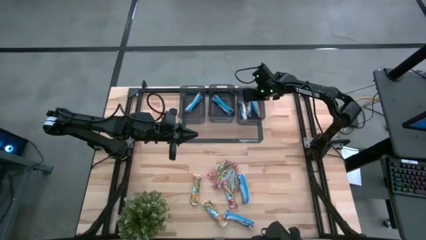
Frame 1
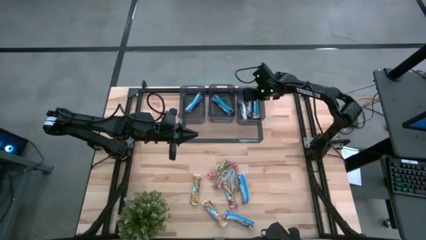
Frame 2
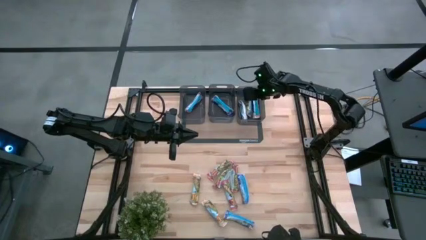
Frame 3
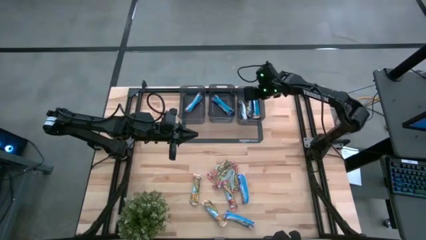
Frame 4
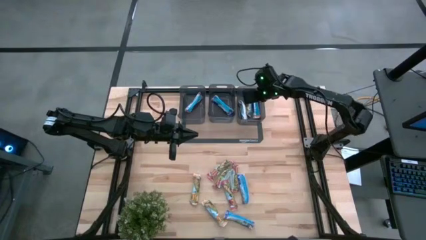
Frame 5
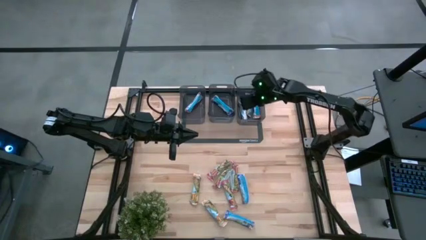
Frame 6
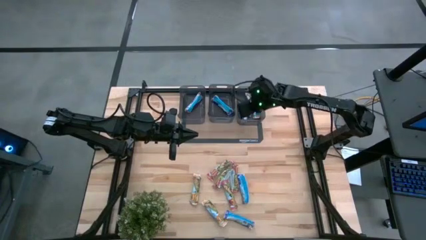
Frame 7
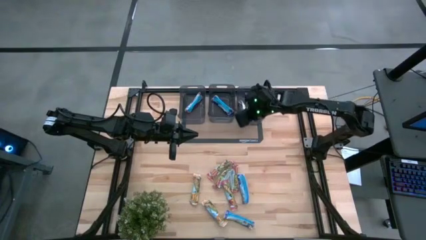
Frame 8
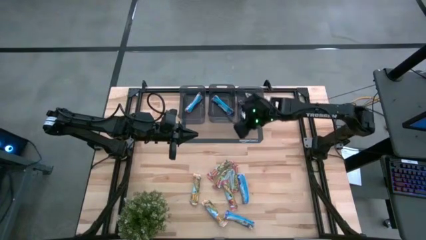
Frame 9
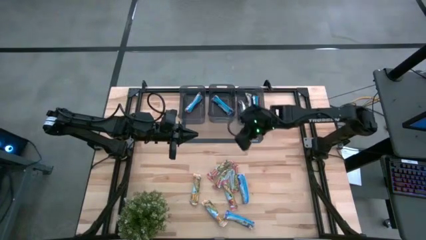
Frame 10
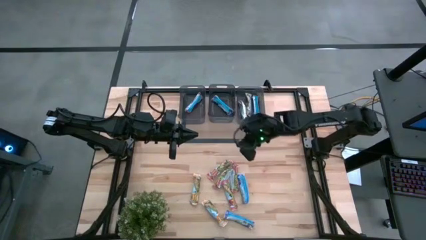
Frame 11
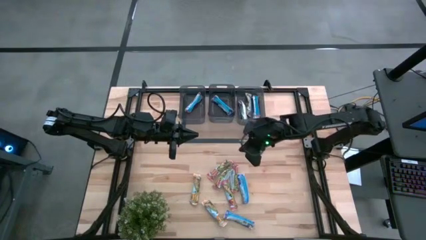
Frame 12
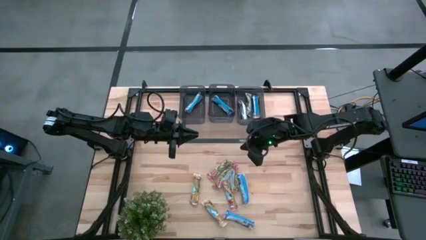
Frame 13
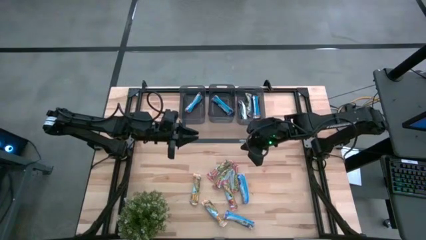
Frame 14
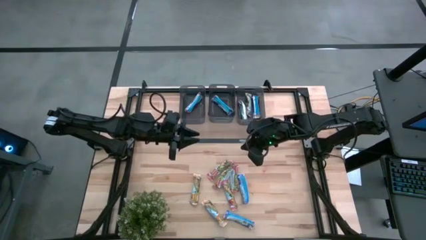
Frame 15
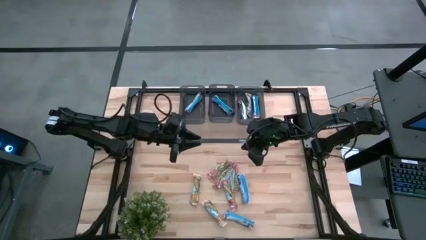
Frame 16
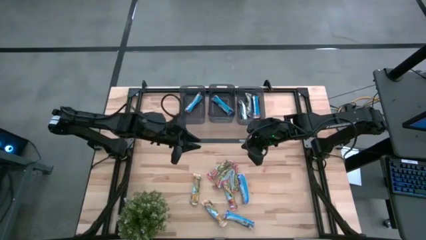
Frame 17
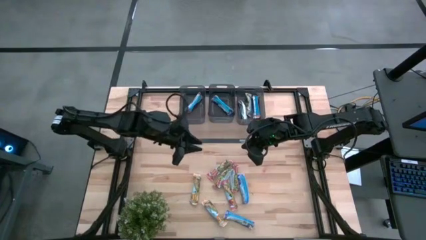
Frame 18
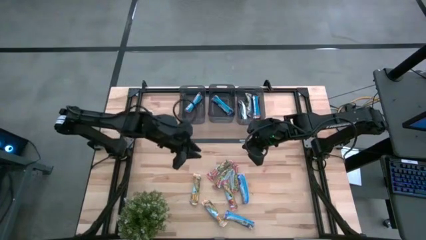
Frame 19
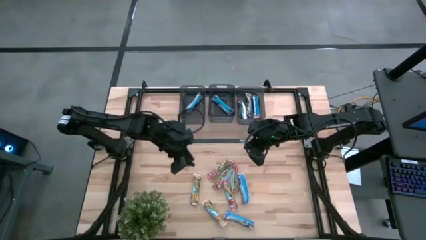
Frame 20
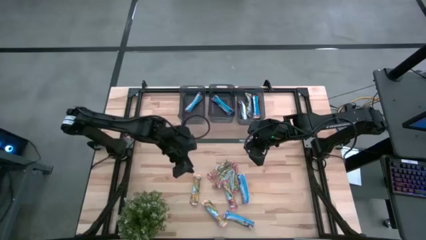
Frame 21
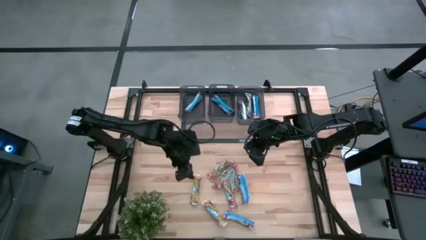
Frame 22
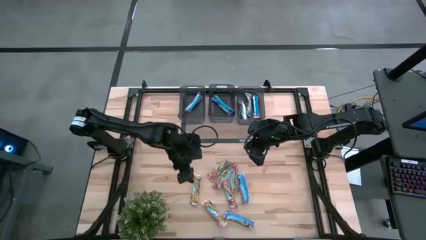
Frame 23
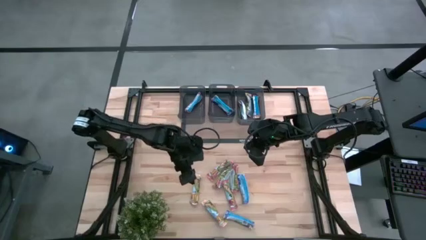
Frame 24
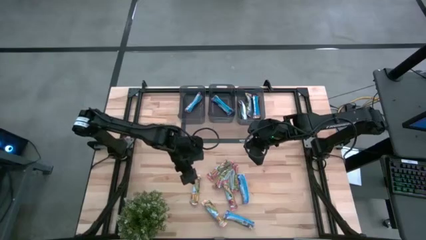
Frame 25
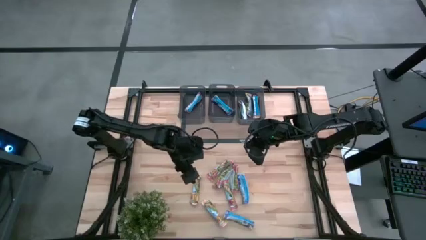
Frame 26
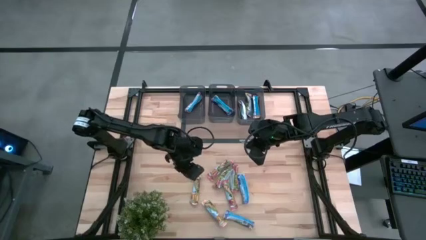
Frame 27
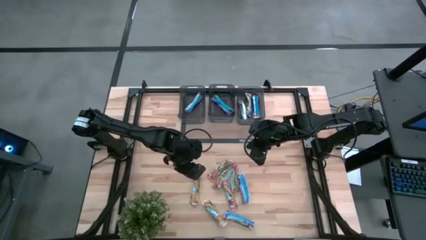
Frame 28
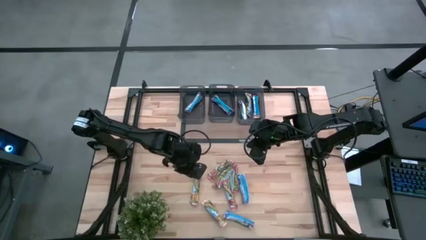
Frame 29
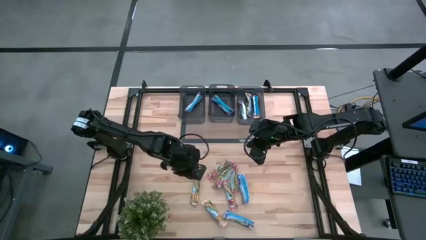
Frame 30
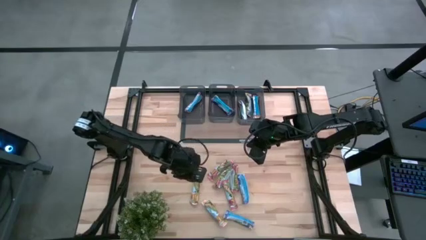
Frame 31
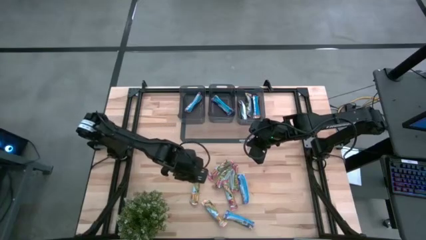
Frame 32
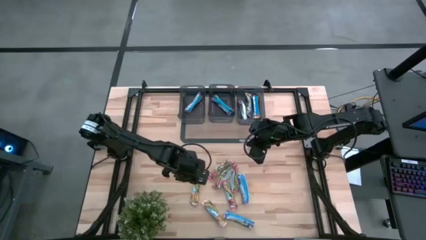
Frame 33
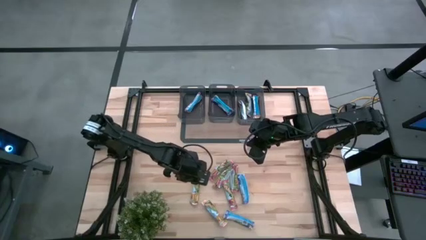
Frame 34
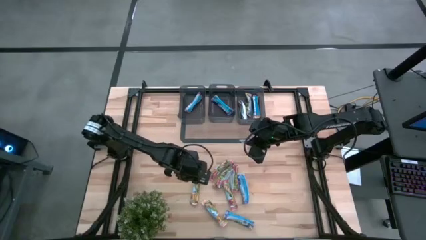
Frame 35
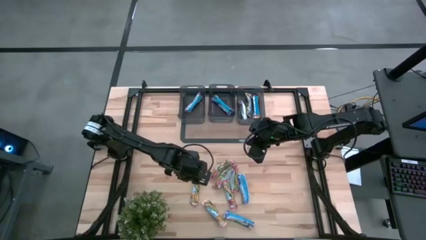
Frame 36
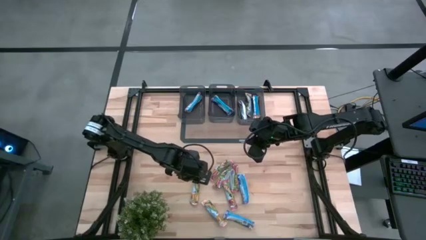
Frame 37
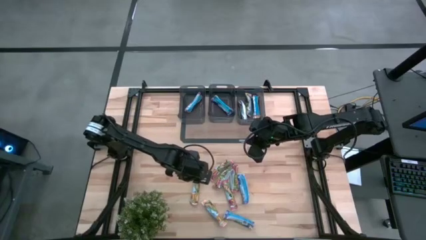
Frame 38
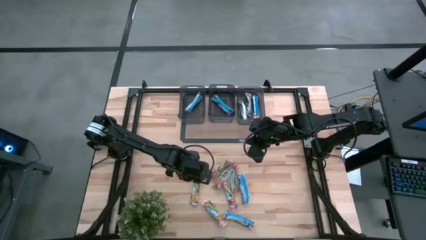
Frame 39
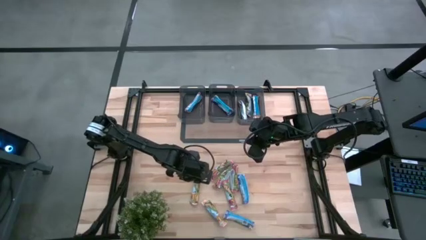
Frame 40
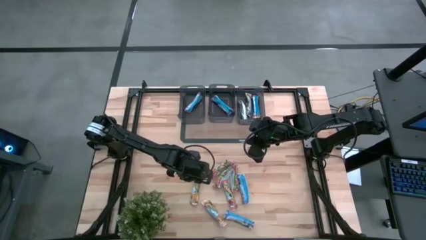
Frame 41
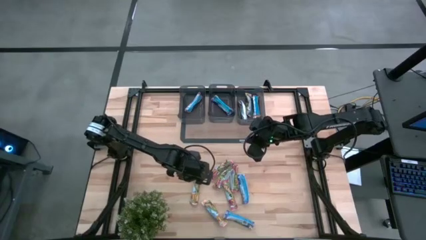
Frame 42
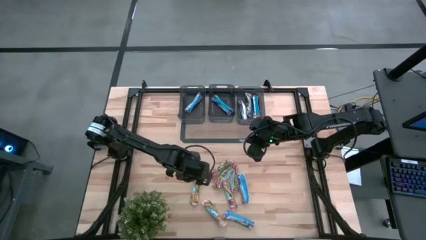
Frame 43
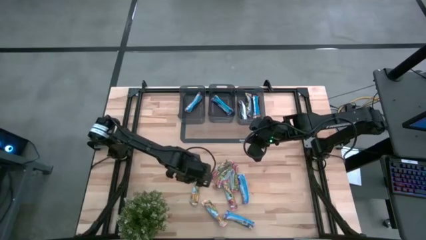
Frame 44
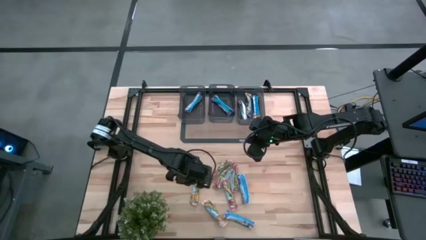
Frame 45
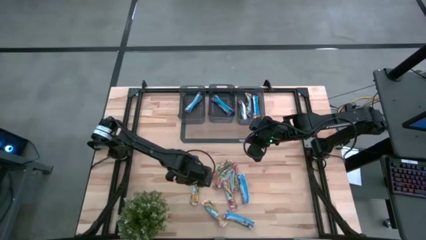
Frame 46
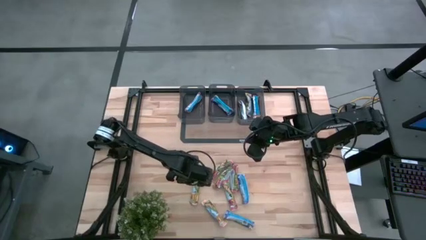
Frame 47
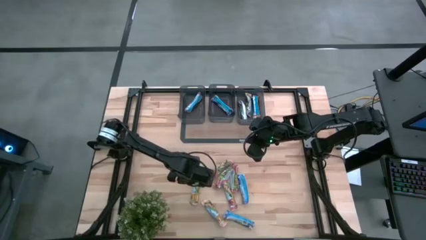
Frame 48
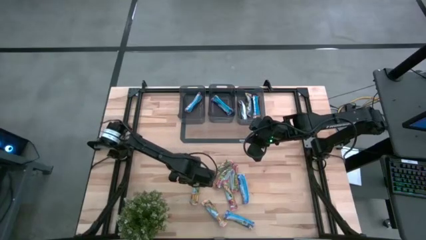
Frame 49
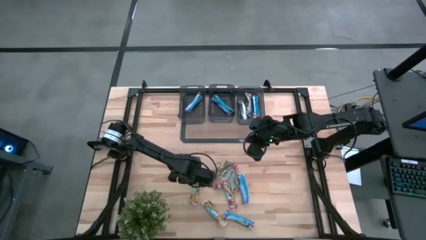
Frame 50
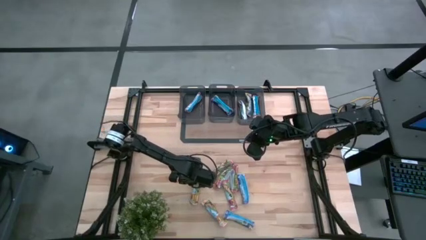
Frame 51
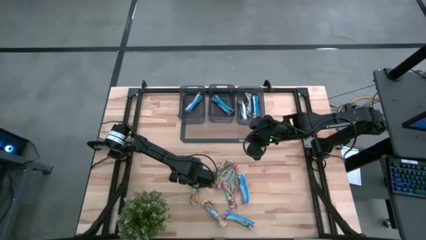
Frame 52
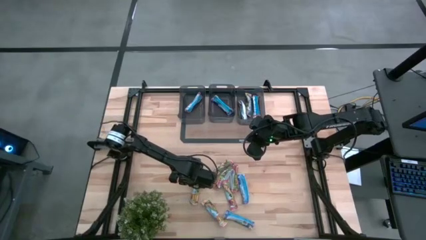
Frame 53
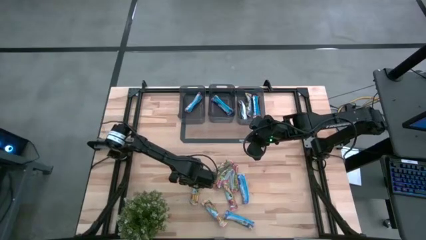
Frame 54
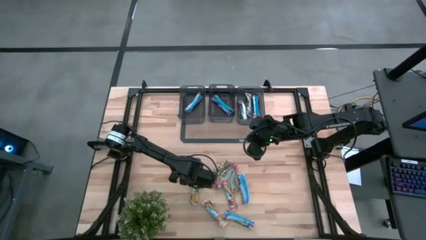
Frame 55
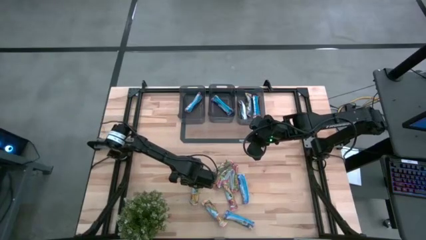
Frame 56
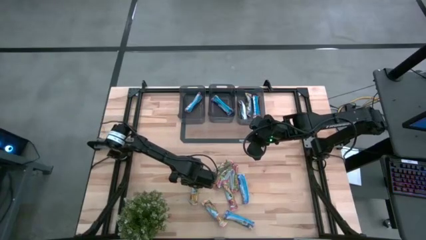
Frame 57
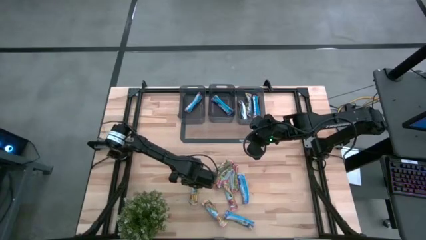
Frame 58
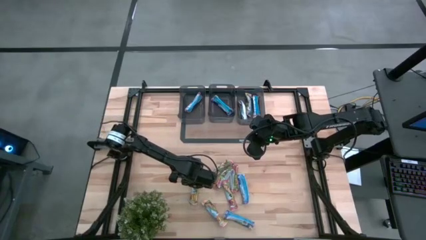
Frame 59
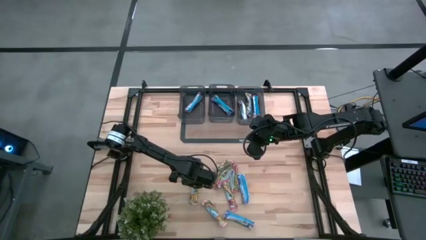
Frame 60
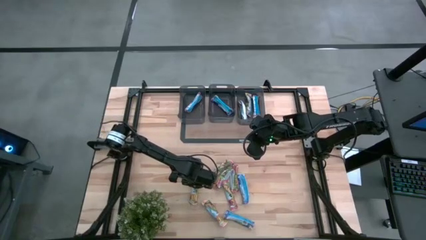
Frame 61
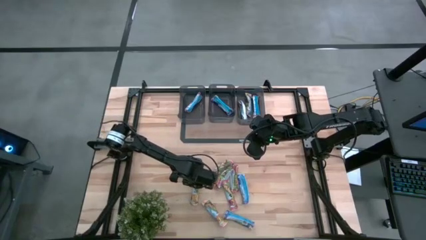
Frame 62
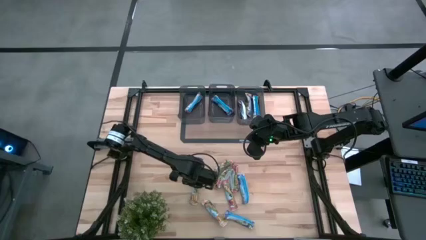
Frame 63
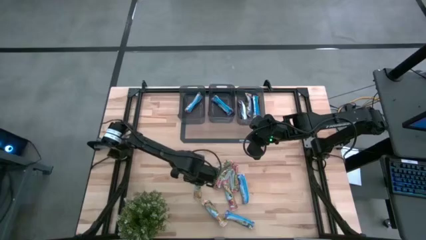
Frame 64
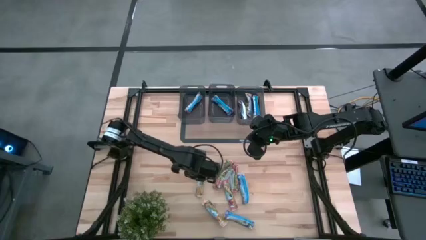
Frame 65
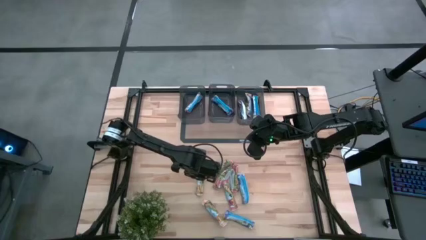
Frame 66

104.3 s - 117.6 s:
Task: Pick and place Granola Bars by type
Put the yellow granola bar into the right black bin

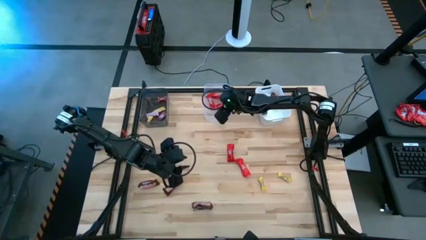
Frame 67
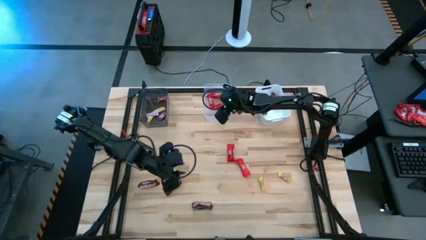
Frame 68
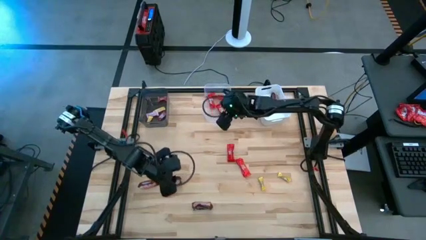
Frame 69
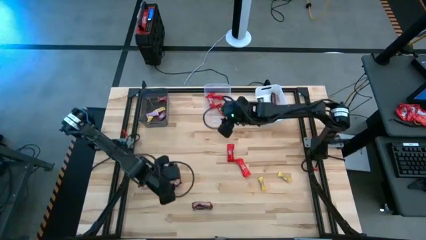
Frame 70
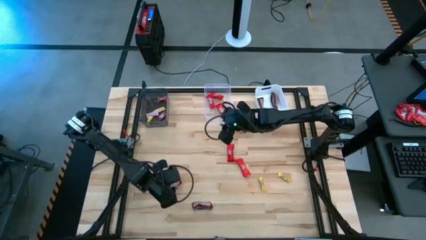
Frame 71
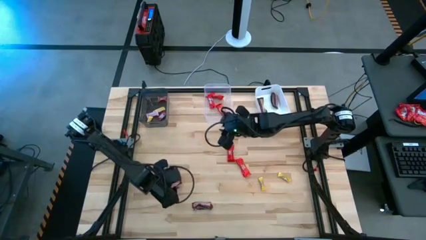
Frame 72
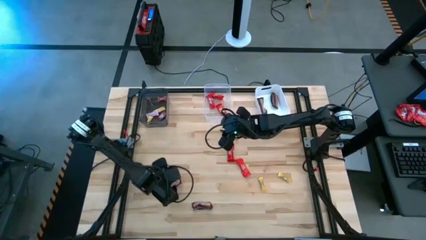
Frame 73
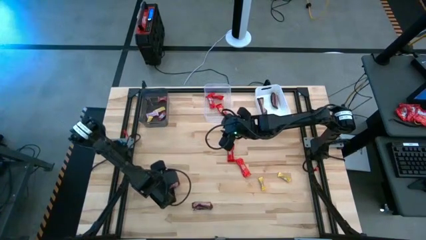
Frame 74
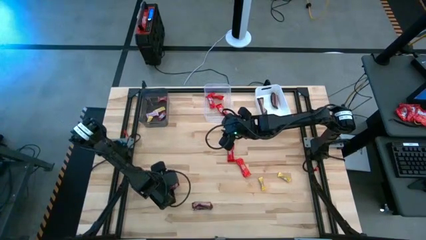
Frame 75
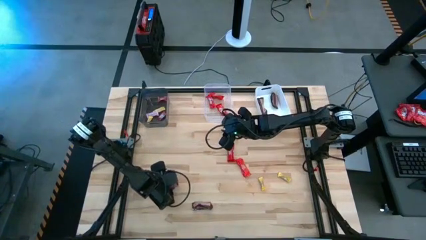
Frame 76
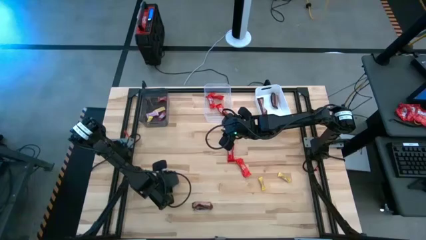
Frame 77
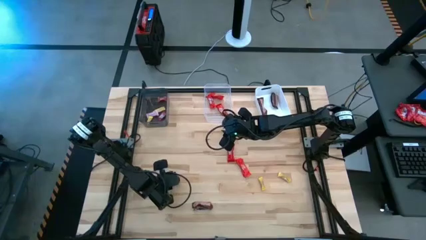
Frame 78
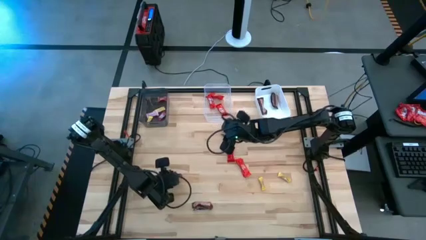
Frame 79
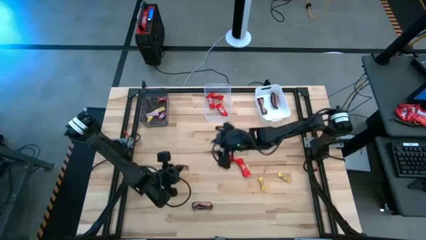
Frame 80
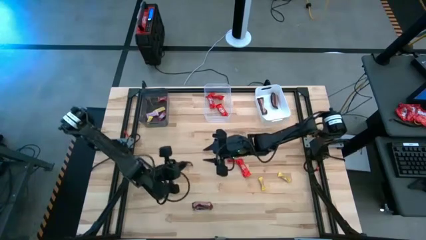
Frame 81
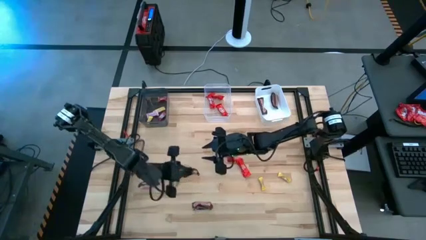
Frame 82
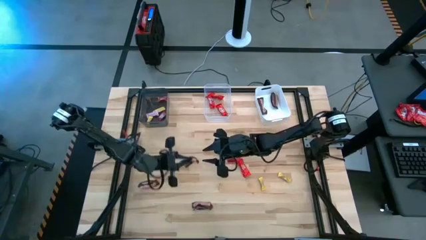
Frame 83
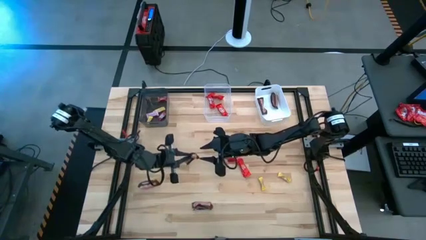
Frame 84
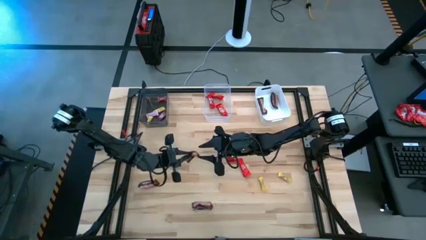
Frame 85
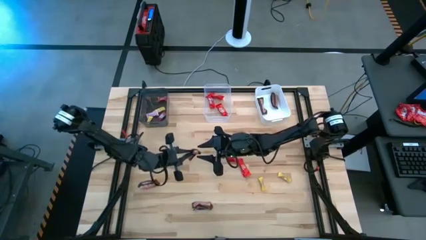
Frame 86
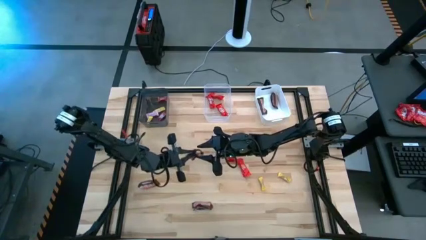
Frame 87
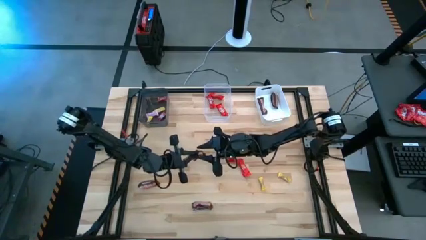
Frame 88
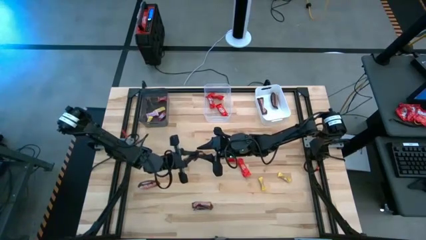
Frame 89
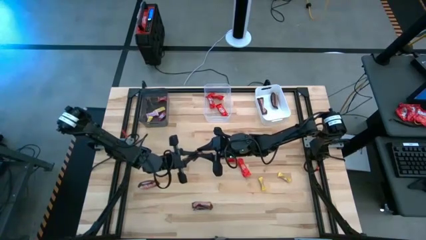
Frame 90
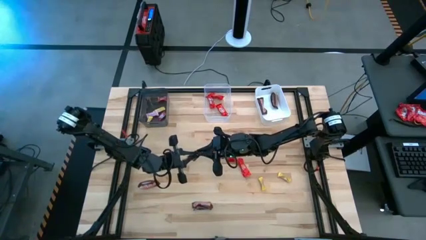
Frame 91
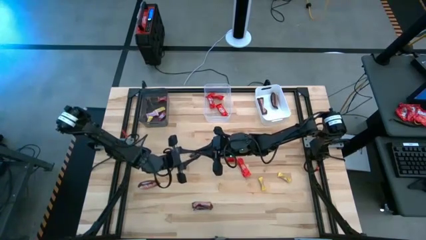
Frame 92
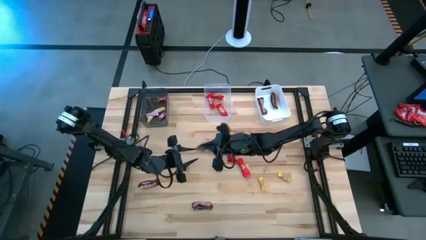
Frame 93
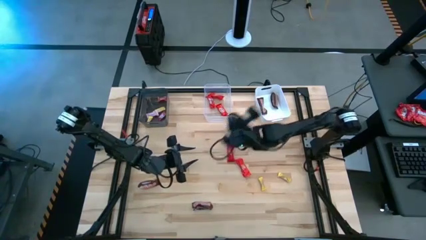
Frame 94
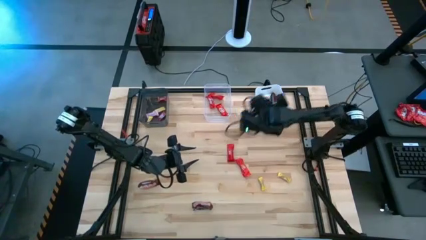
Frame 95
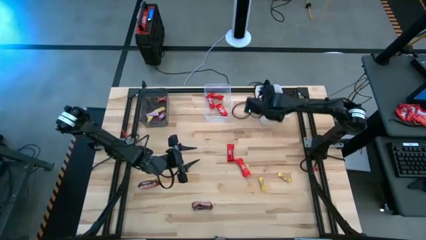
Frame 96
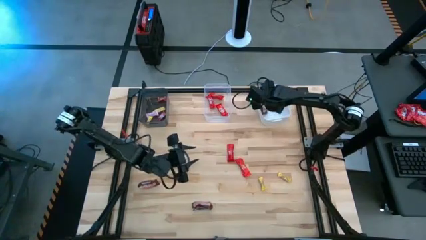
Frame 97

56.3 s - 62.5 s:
Task: Sort candy by brand, put in halloween buckets
Put the brown chocolate bar into the white bin
